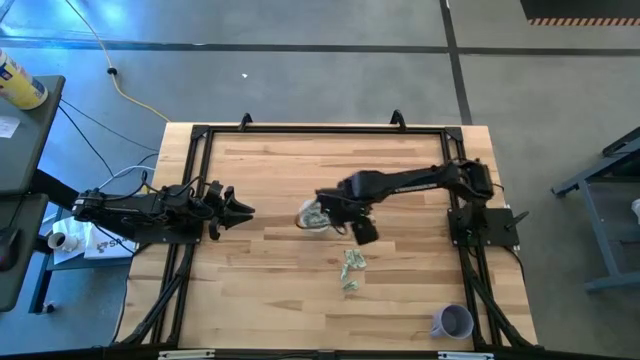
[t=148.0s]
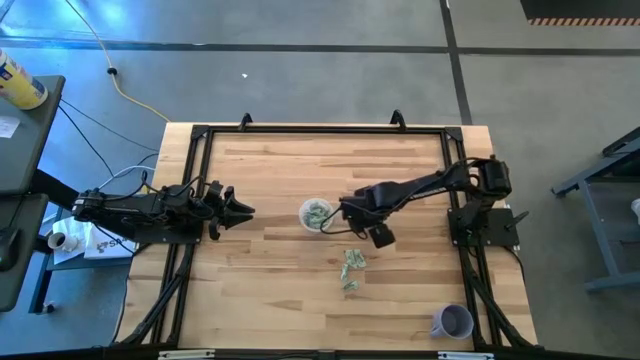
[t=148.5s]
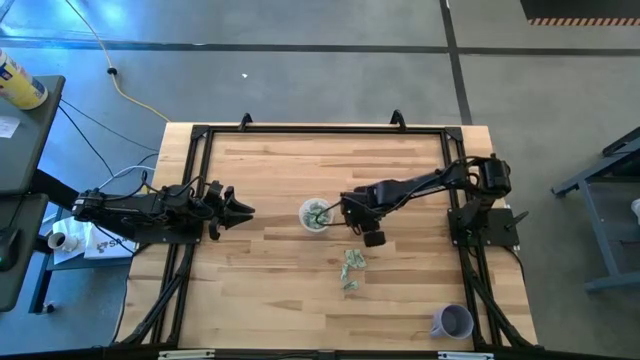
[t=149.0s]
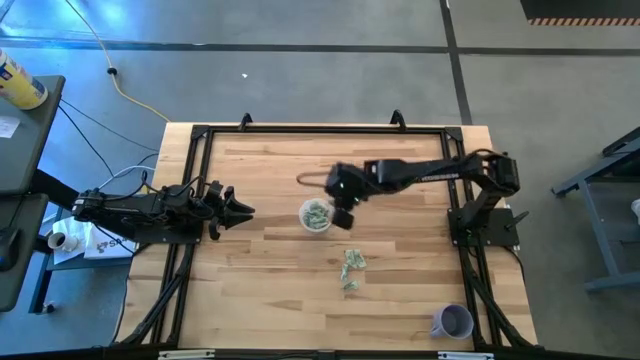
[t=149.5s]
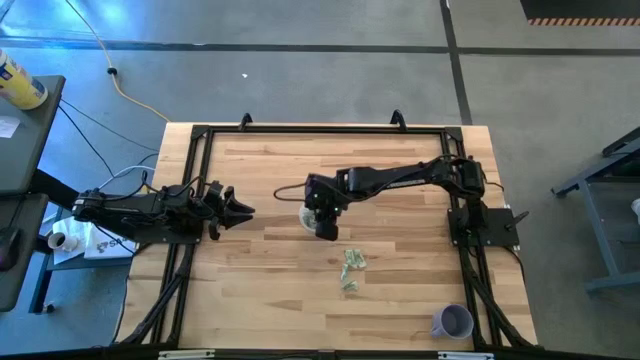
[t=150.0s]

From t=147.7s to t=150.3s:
Task: Pick and place Stevia / Truvia into bins
Put the white stevia packet into the transparent container

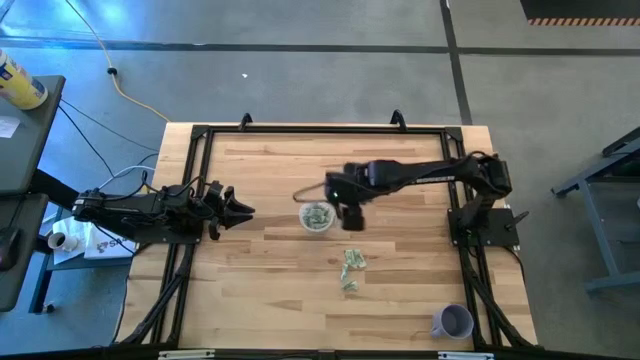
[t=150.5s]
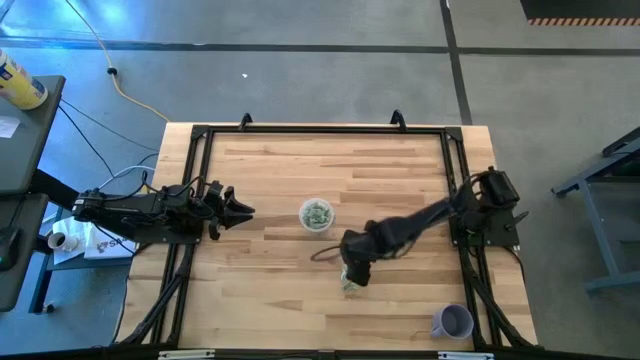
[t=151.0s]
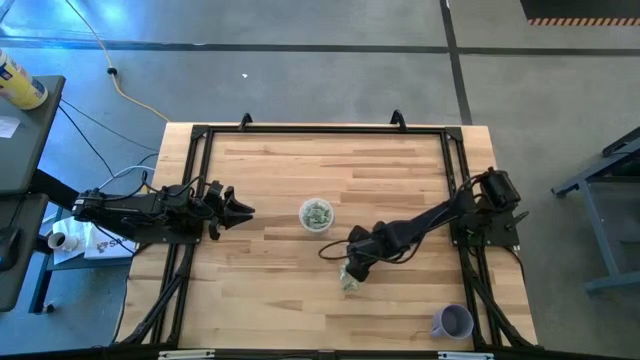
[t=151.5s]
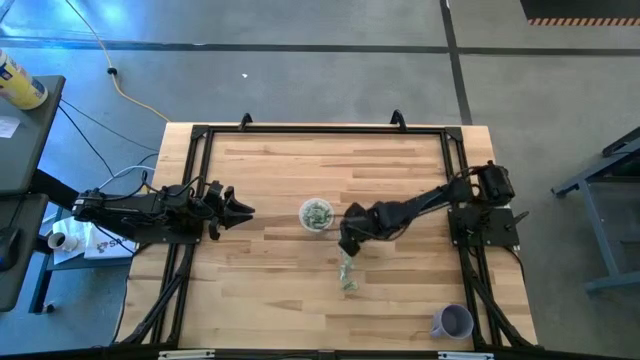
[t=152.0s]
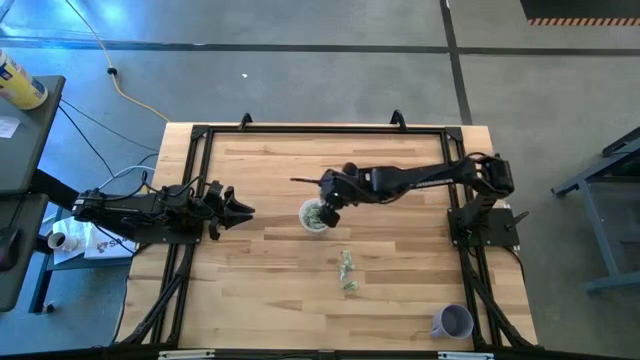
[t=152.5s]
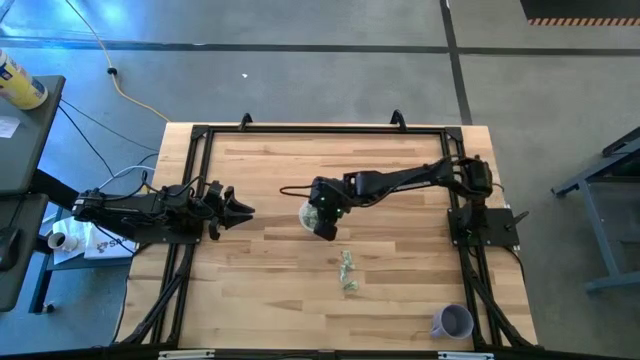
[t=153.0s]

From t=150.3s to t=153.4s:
Put the white stevia packet into the transparent container

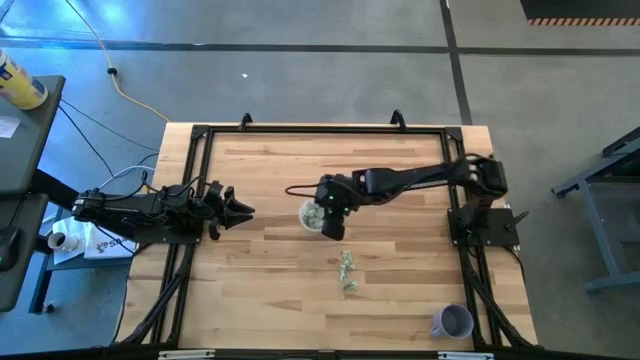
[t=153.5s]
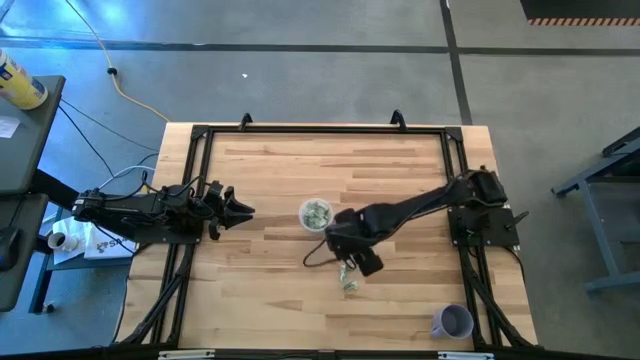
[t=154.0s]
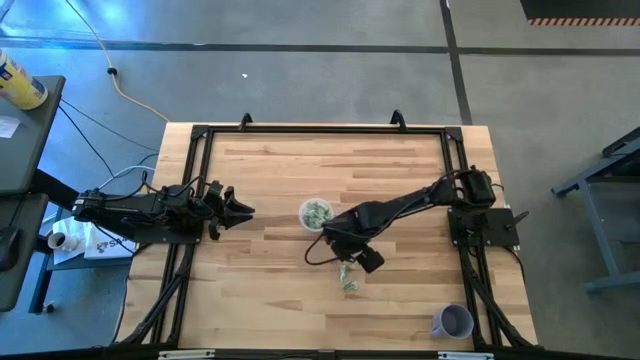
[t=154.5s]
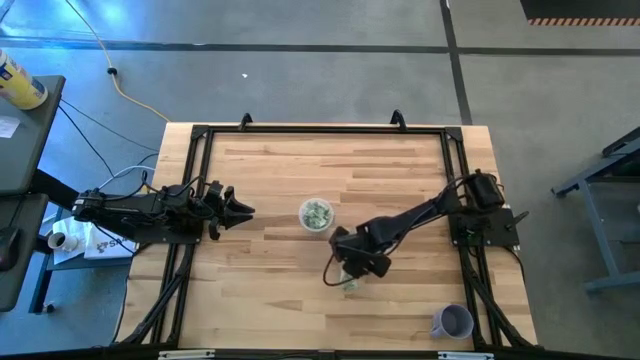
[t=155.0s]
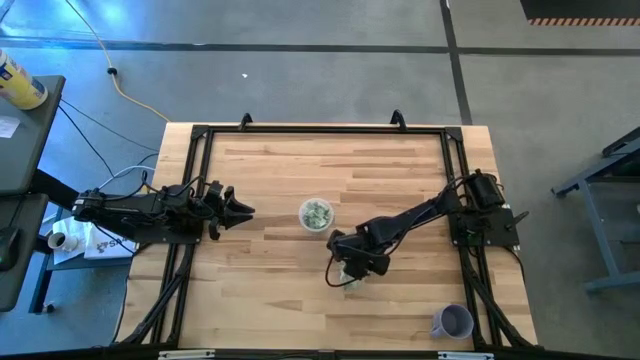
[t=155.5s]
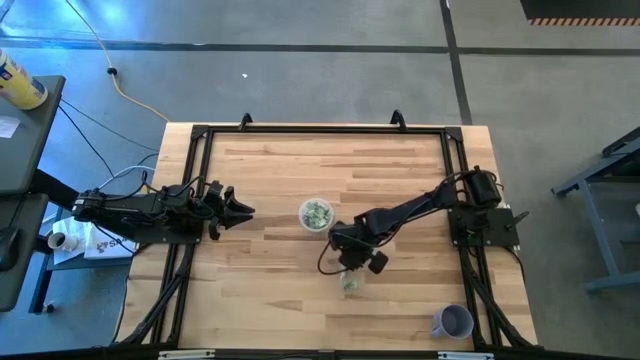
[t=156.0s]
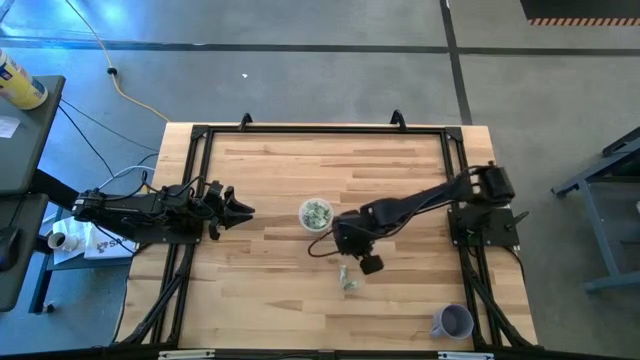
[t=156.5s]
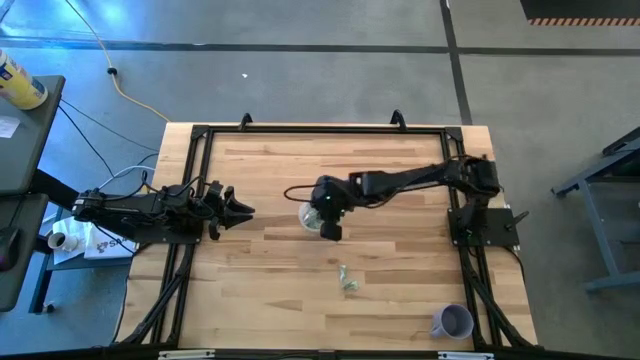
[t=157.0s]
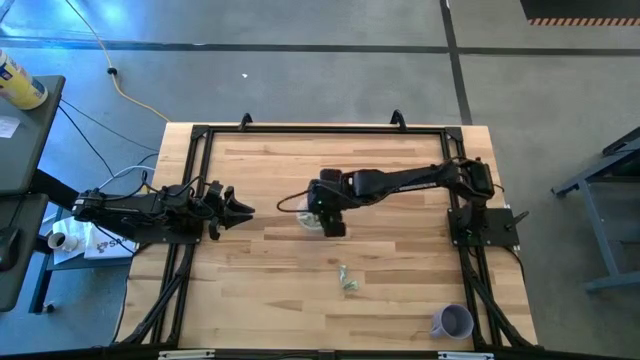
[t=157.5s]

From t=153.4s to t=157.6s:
Put the white stevia packet into the transparent container

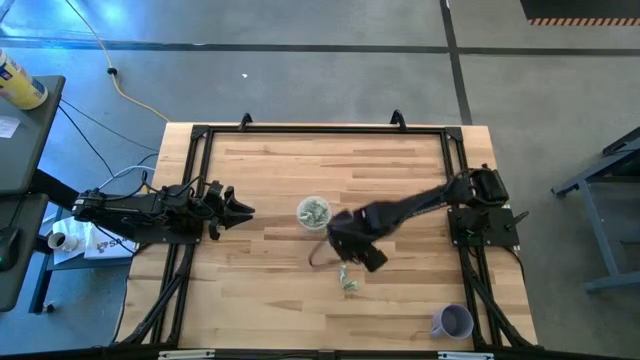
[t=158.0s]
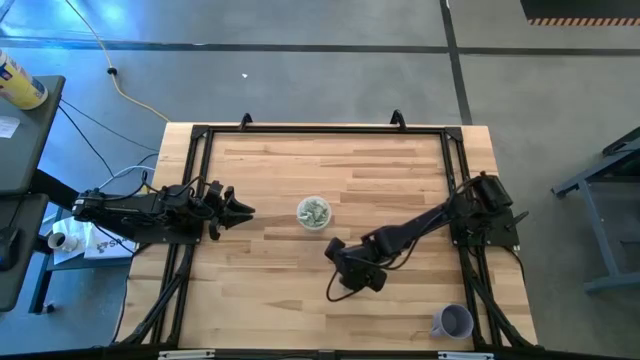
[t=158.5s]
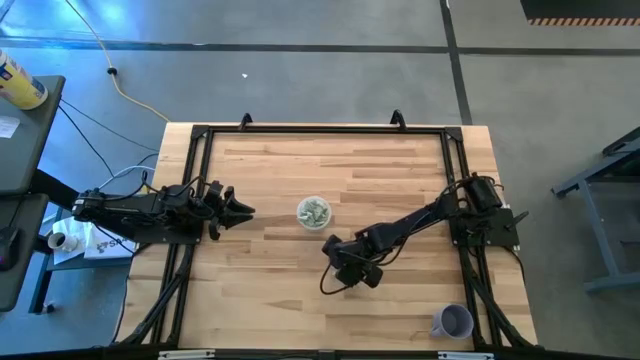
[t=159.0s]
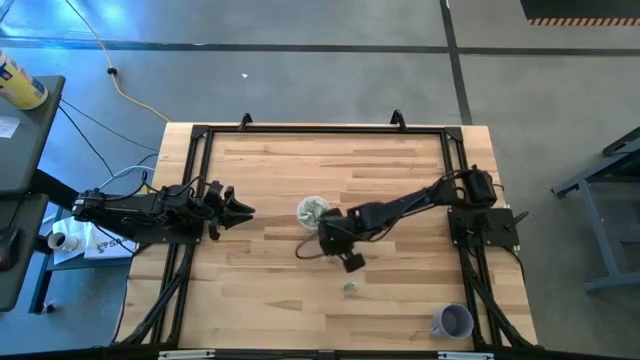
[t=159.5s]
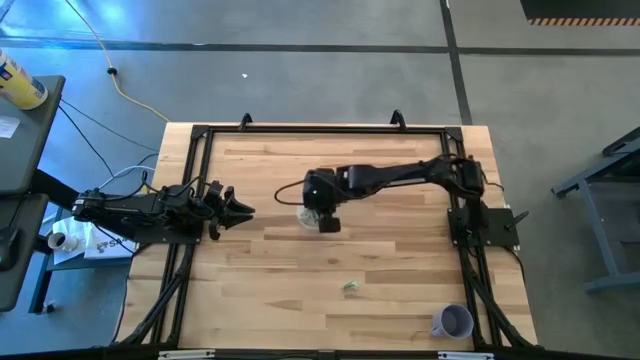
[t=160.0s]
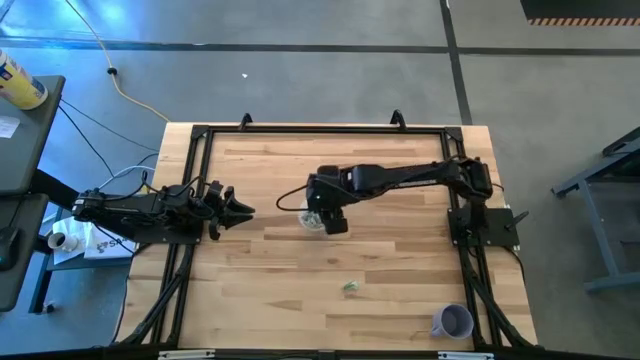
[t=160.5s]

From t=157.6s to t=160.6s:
Put the white stevia packet into the transparent container

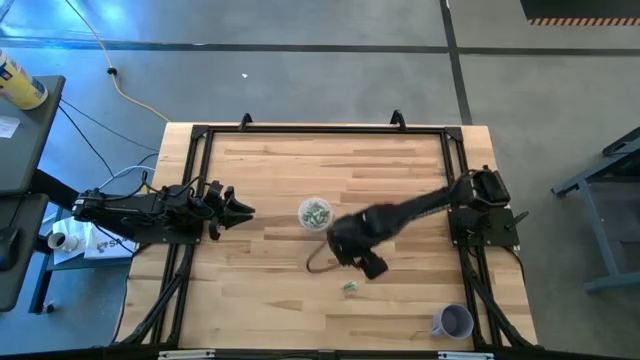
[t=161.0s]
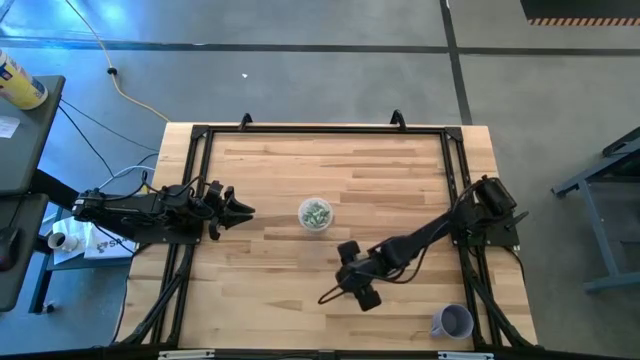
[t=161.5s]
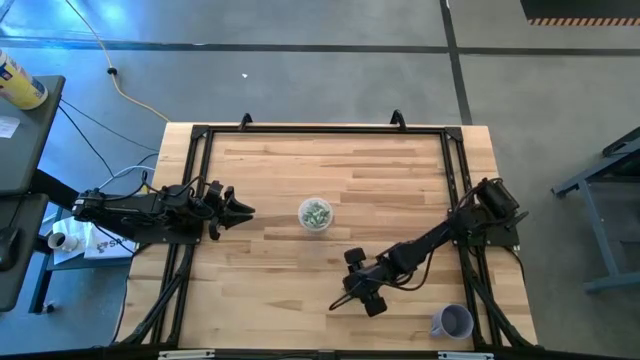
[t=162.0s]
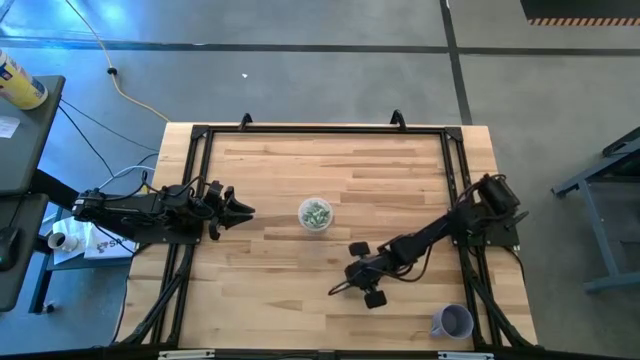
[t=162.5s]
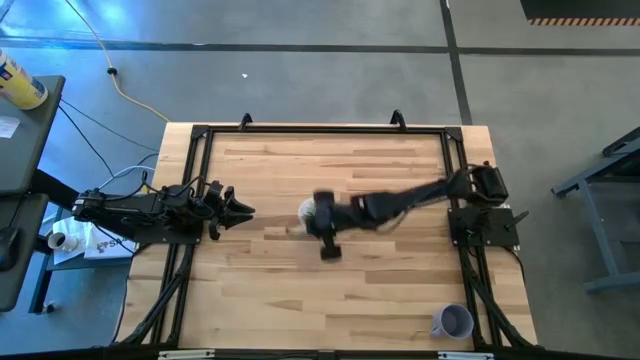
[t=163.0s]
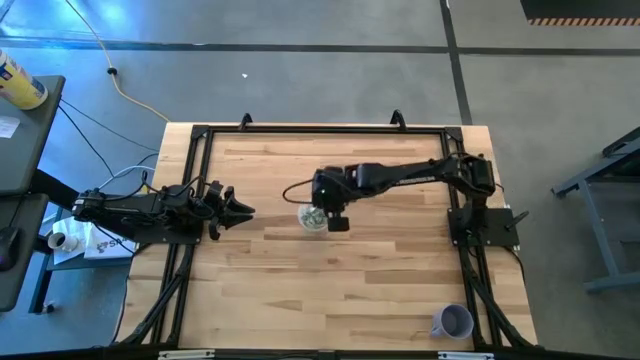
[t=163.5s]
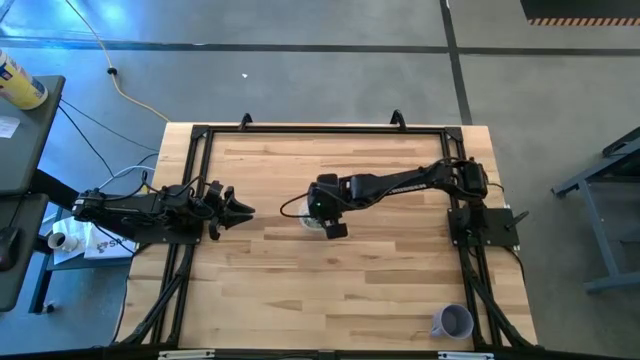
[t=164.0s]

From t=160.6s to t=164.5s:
Put the white stevia packet into the transparent container

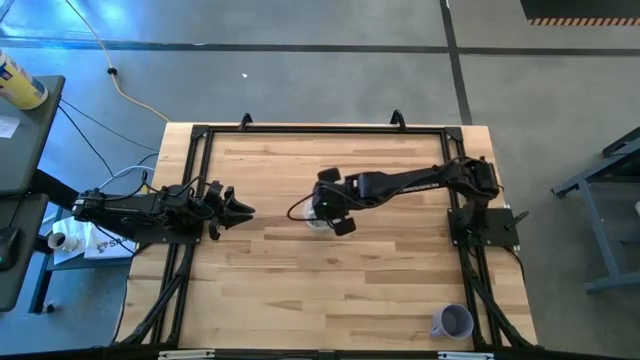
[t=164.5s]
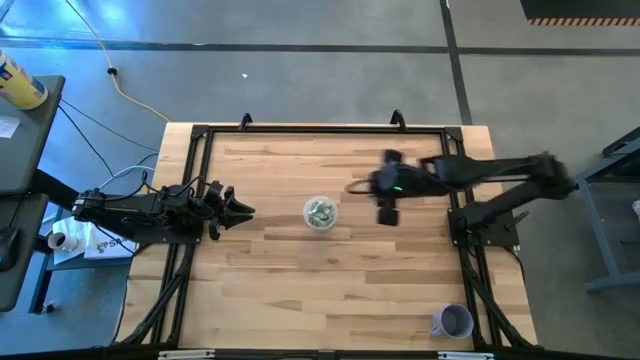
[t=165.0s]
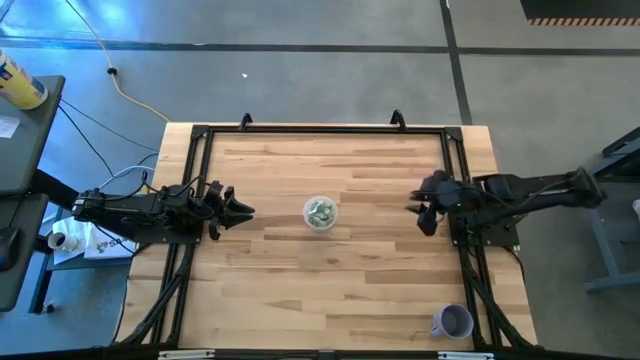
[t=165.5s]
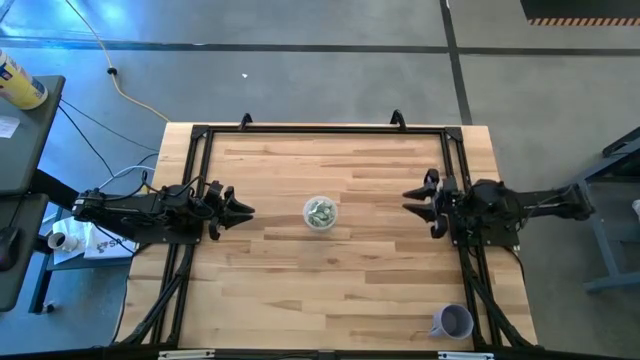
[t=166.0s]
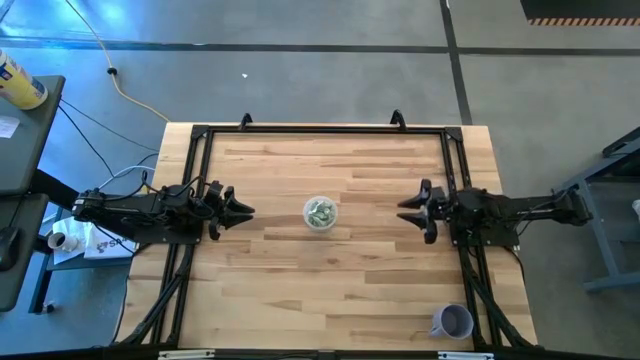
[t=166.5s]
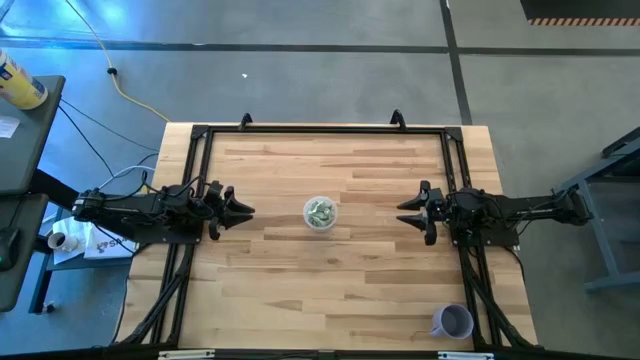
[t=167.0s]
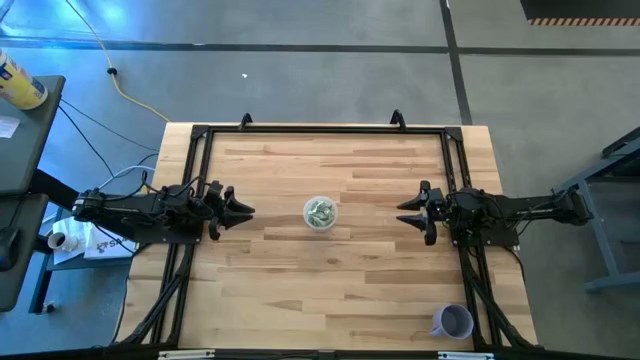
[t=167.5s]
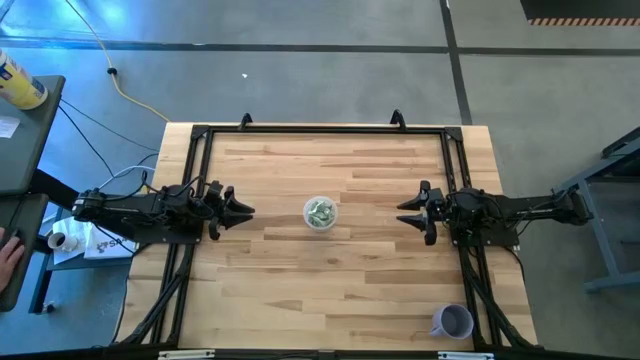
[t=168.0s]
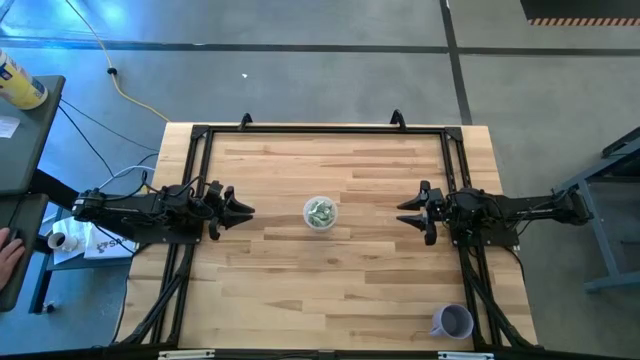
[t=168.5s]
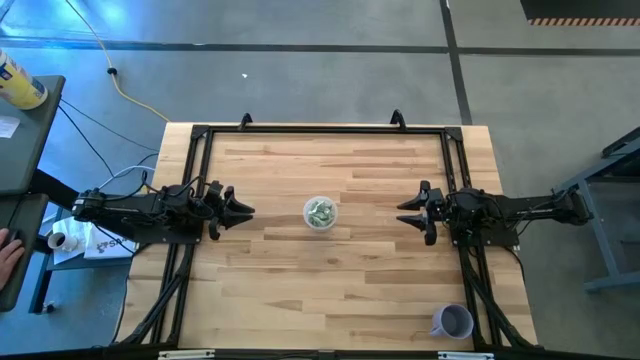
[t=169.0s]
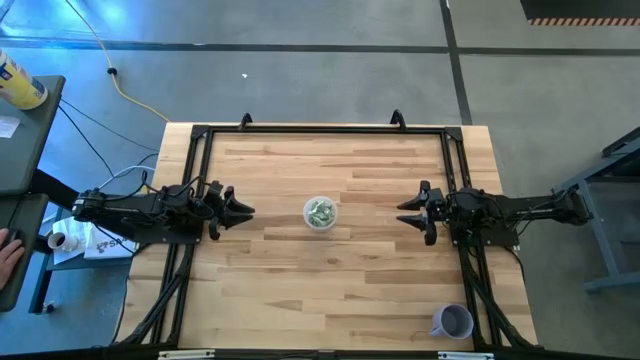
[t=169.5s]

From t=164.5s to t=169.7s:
Return to Home Position
